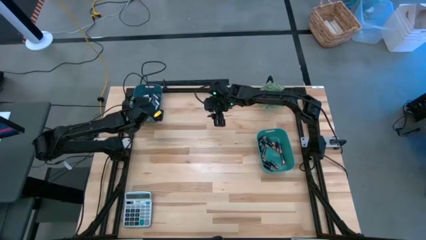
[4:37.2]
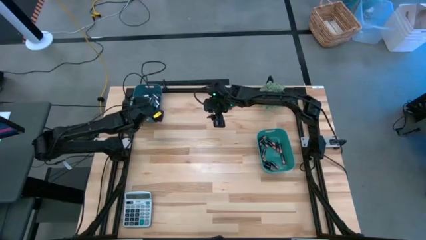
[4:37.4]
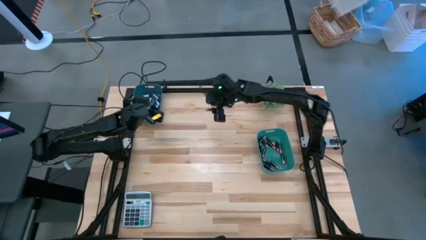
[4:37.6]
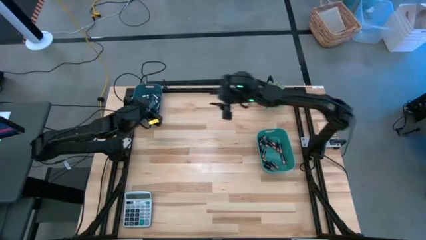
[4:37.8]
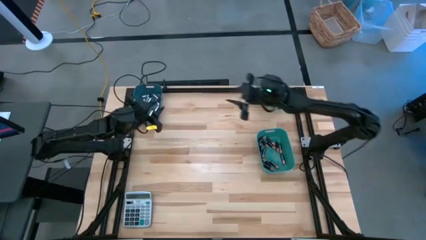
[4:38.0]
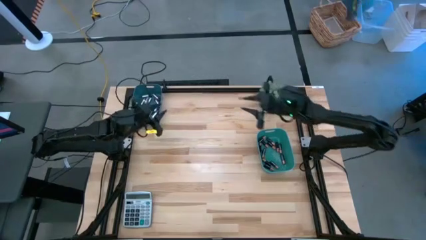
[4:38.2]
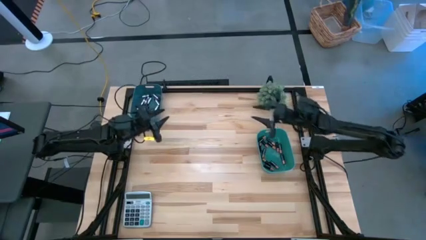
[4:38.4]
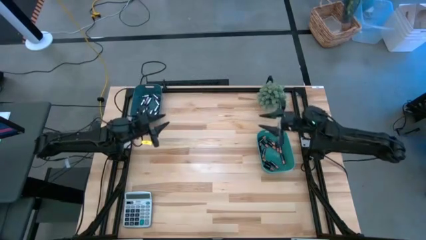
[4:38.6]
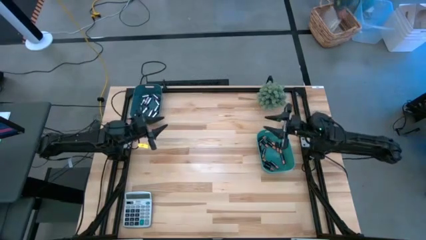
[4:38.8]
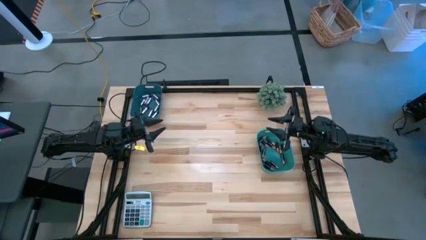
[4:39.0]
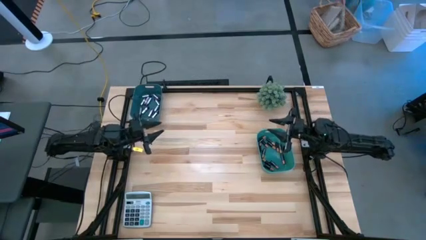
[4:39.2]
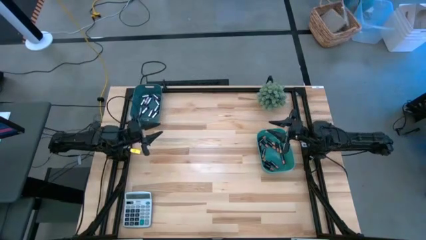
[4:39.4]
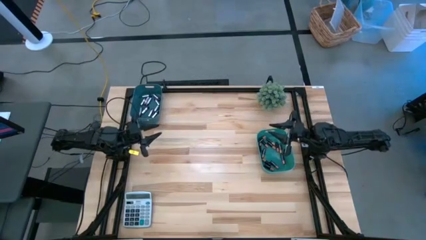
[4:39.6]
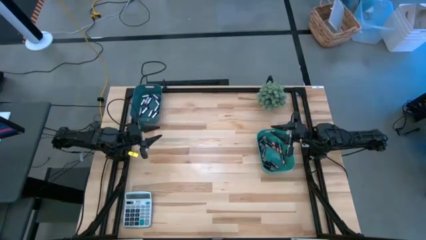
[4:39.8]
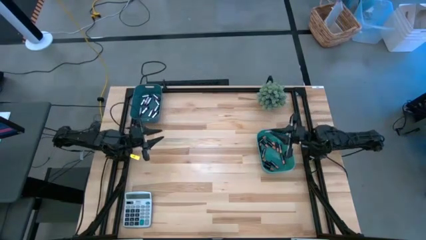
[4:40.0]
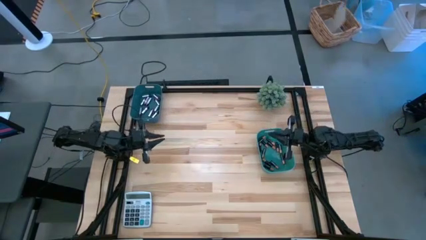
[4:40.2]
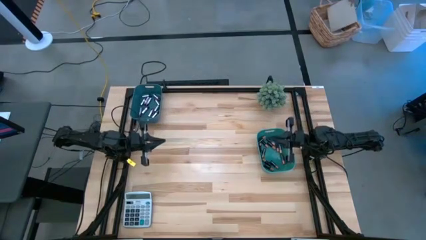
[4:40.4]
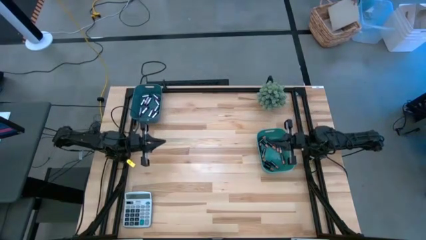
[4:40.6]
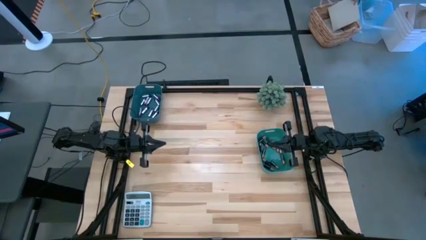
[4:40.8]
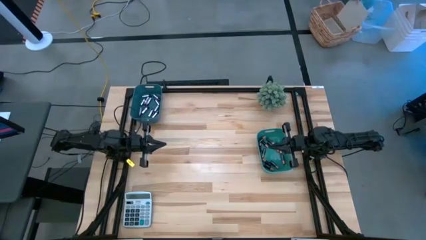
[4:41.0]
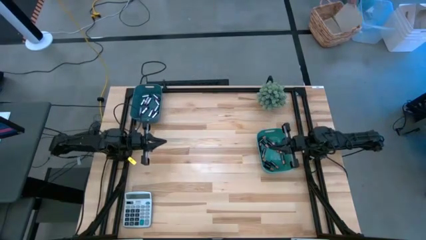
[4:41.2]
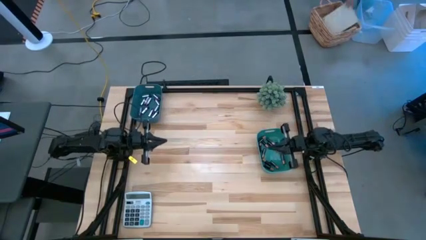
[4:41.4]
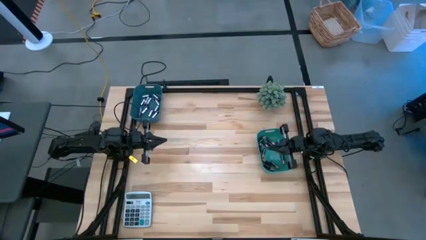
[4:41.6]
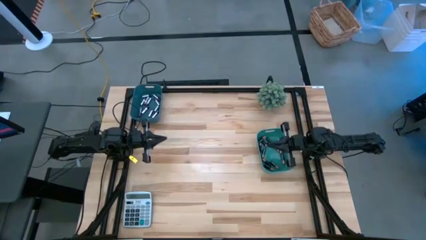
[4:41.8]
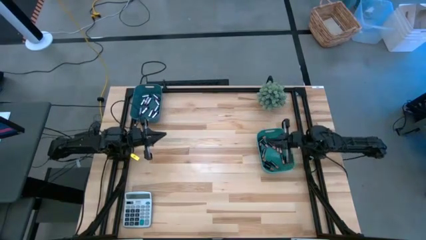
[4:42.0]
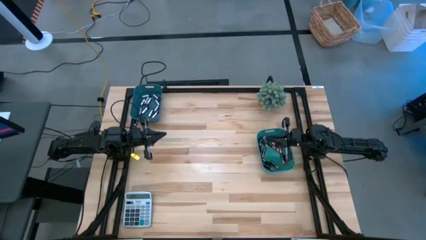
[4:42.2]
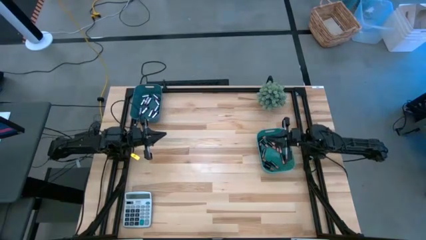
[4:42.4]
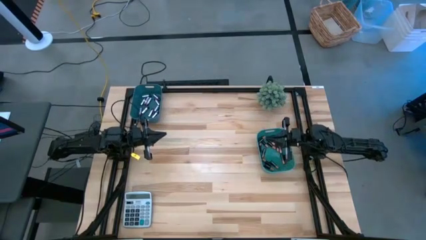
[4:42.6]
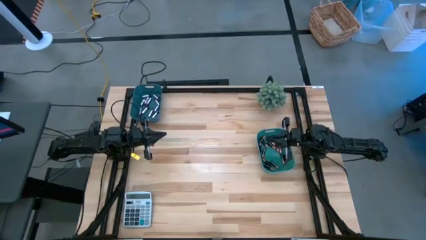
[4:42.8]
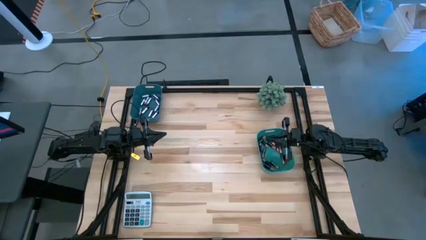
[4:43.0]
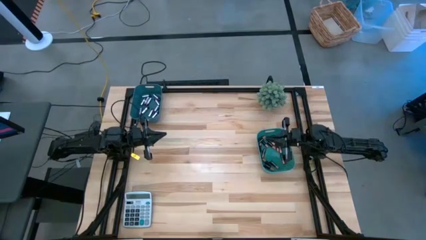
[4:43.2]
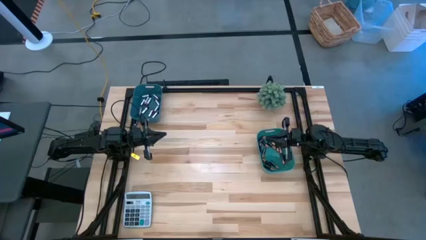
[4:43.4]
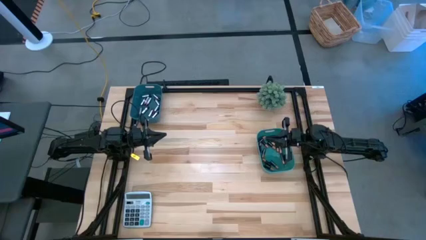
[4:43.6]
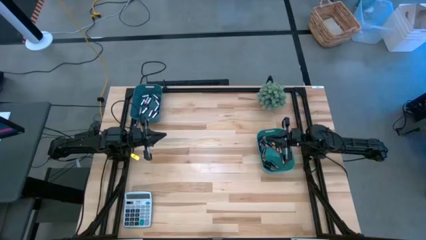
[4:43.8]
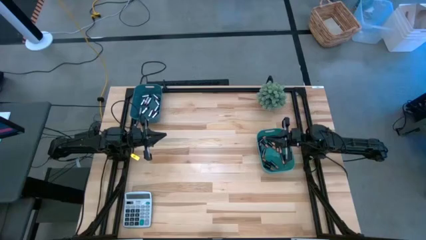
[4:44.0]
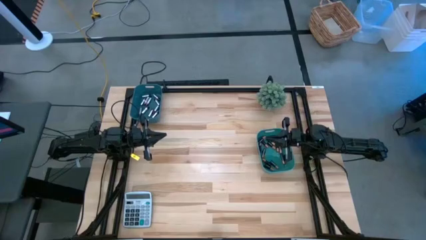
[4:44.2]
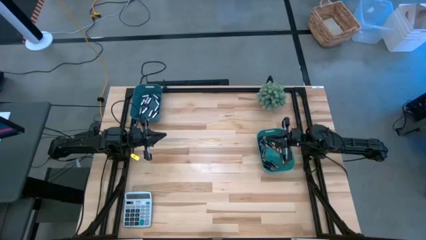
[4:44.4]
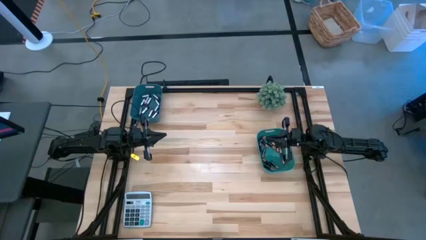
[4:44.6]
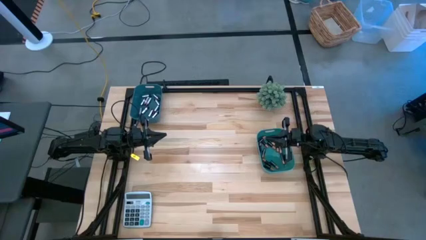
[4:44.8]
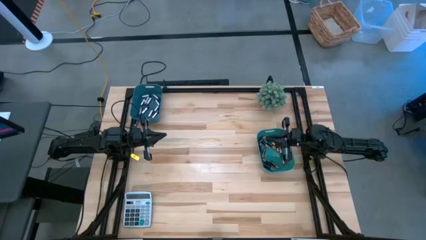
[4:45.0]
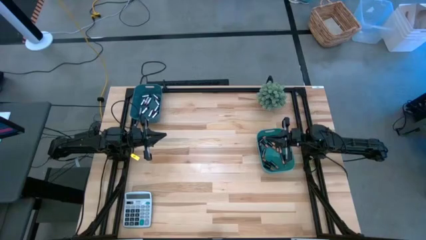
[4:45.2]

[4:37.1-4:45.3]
Task: Sort batteries
Return to Home Position

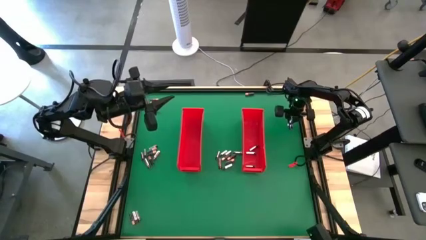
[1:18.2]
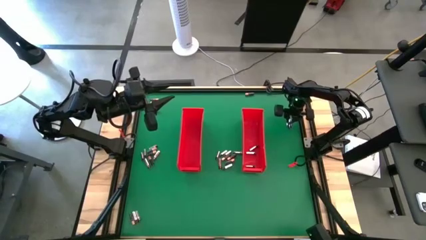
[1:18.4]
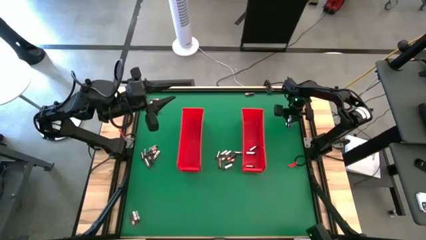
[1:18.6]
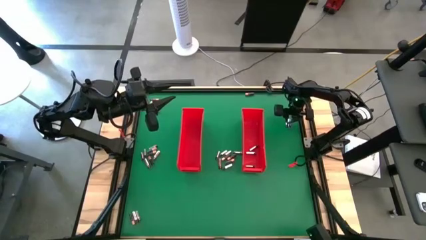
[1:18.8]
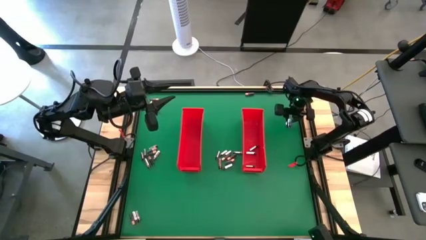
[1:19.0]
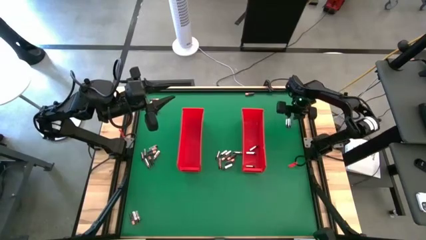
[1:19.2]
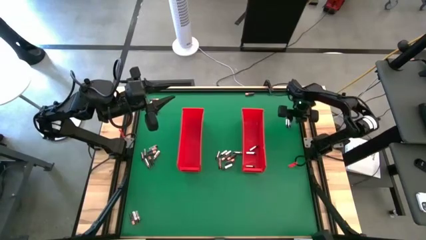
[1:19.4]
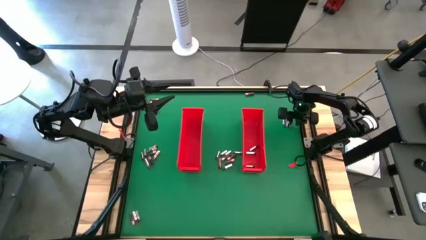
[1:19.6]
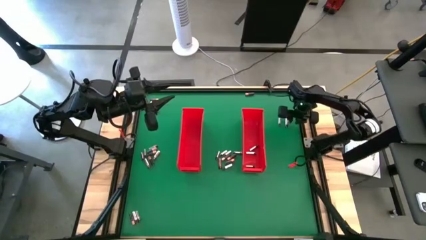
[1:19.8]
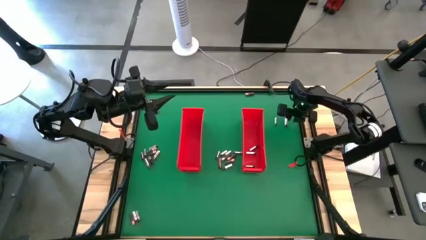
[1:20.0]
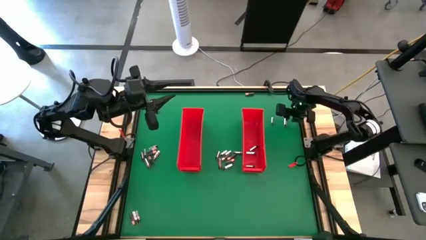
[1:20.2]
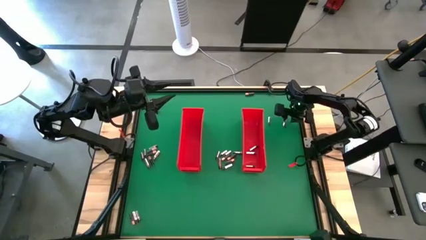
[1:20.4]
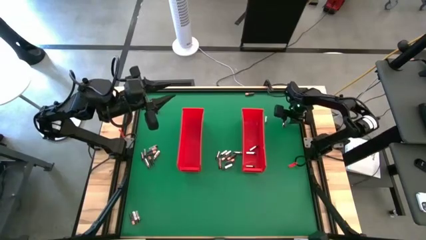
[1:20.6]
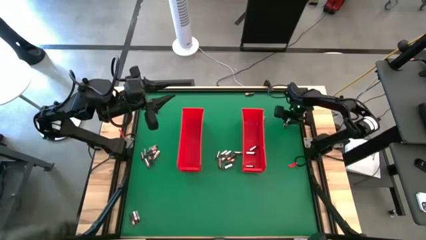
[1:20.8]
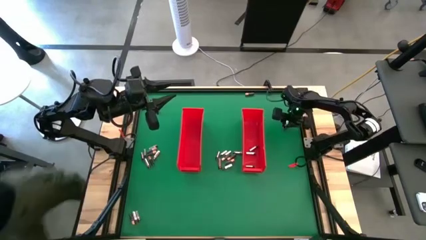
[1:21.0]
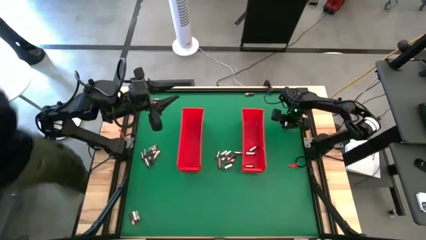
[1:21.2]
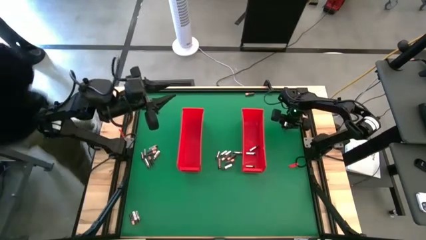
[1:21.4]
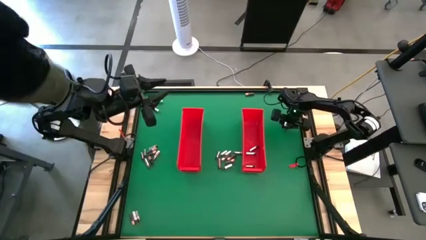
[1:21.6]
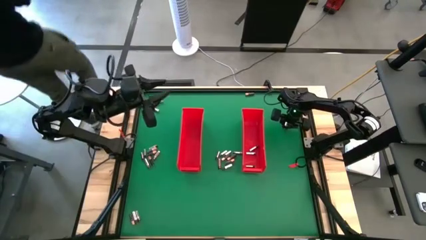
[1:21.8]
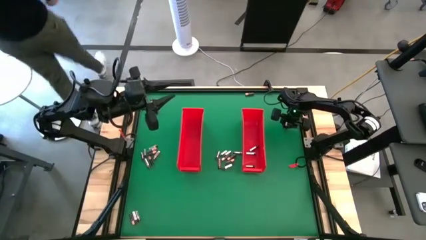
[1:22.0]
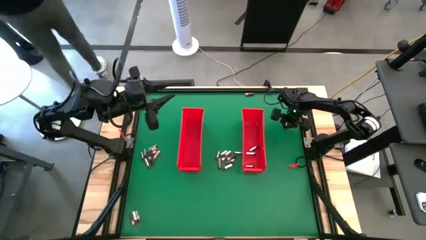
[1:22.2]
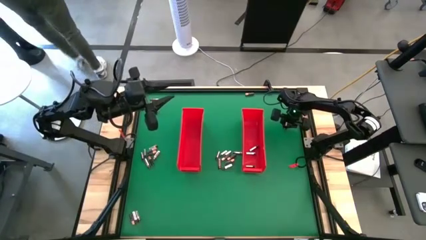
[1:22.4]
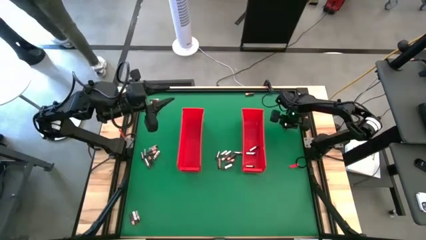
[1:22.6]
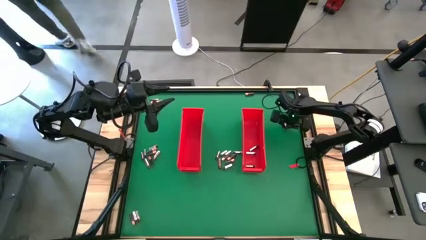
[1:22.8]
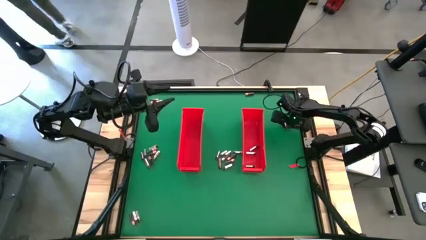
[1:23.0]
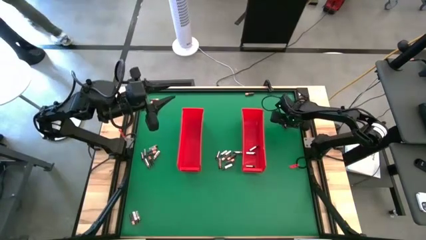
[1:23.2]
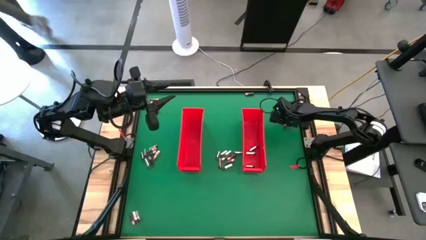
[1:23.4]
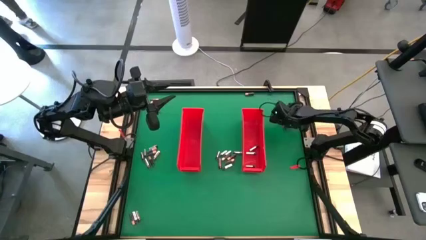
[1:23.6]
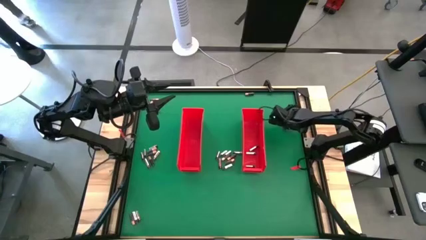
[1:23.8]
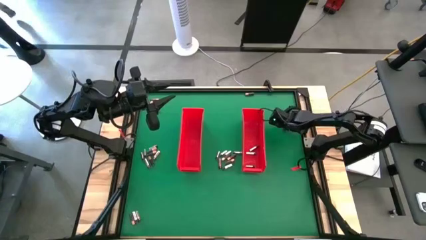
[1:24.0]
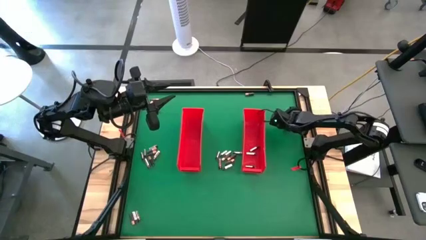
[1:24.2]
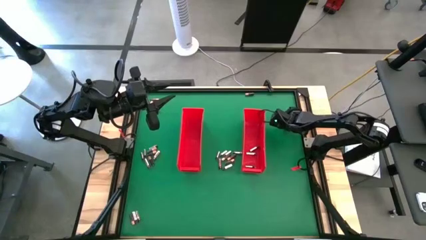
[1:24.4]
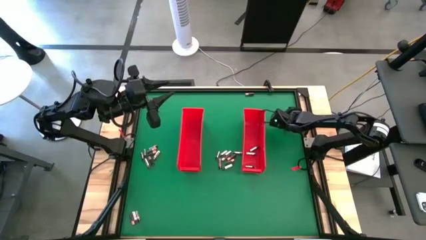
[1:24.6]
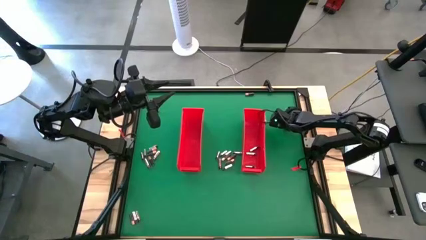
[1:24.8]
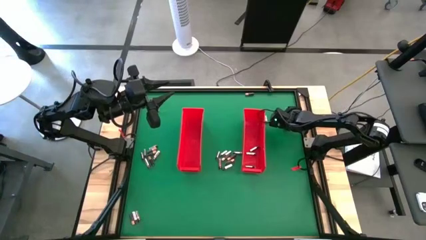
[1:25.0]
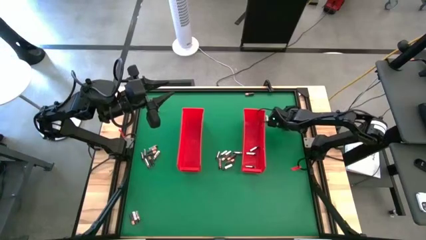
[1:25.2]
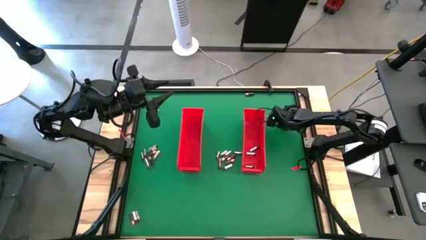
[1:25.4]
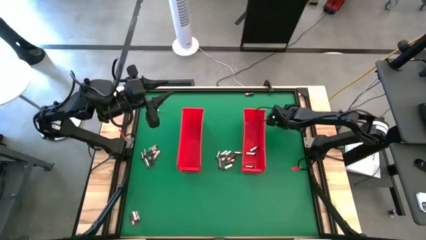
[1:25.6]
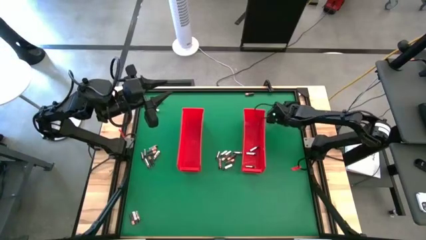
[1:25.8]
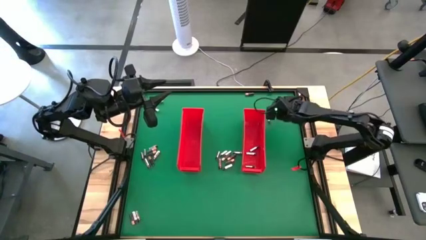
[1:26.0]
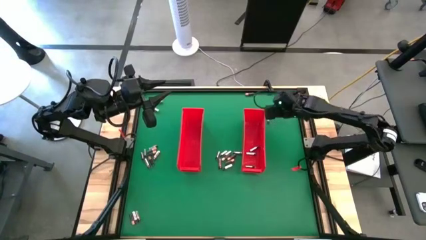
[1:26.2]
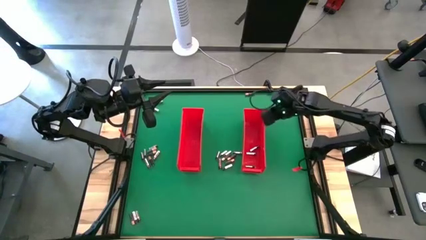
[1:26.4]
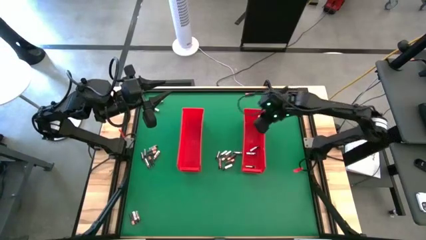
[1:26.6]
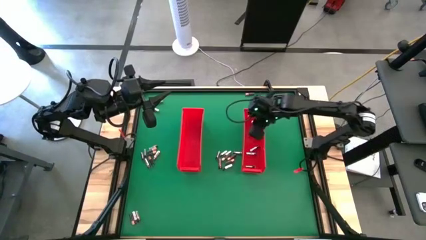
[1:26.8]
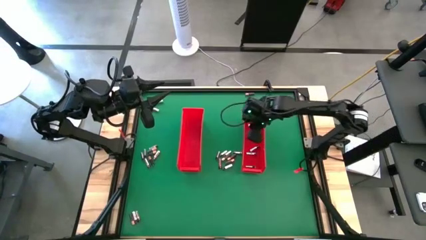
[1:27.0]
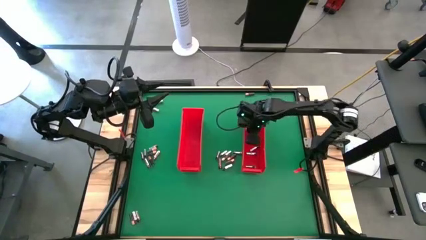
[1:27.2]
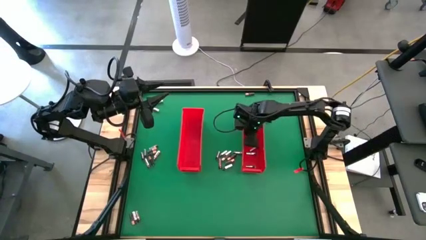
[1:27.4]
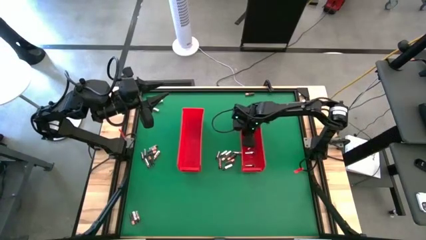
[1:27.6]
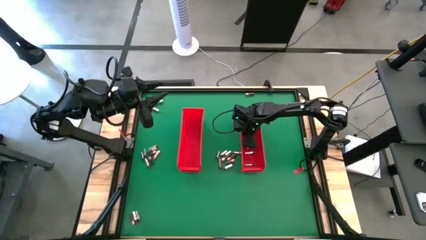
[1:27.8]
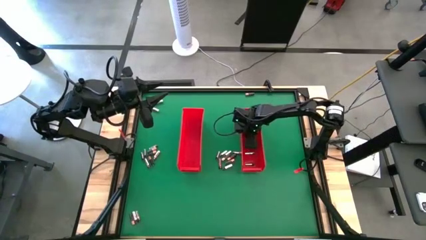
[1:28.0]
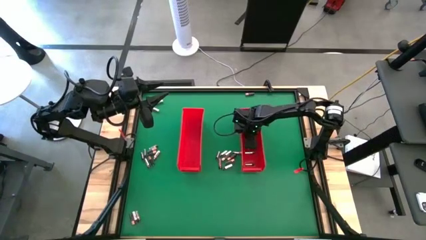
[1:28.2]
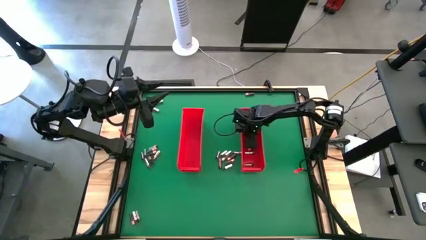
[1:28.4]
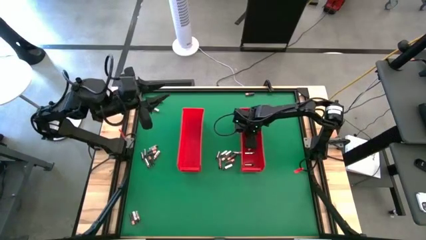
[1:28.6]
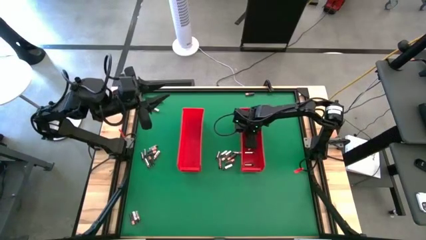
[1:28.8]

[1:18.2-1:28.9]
Task: Sort batteries
Put the silver battery into the right red bin
